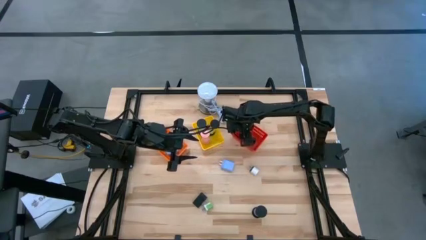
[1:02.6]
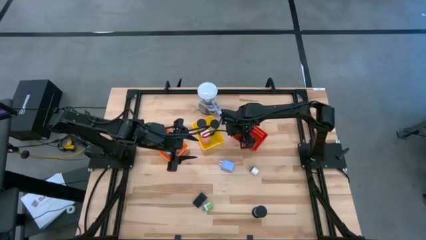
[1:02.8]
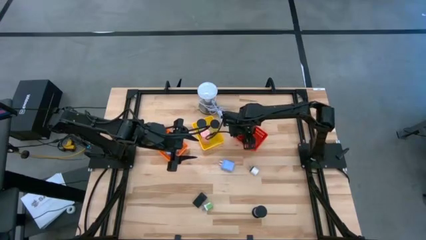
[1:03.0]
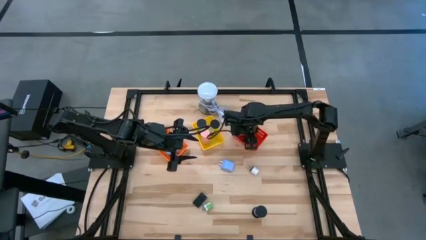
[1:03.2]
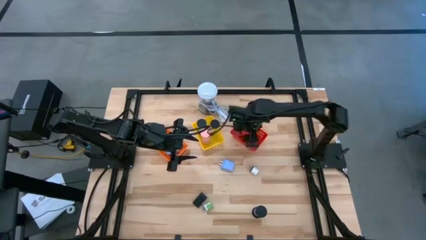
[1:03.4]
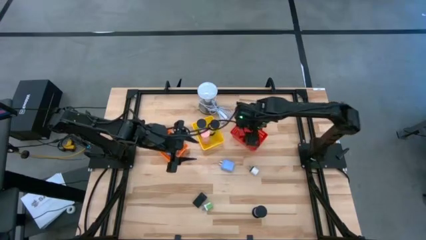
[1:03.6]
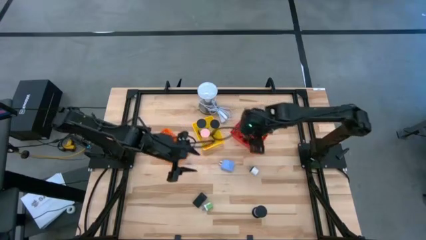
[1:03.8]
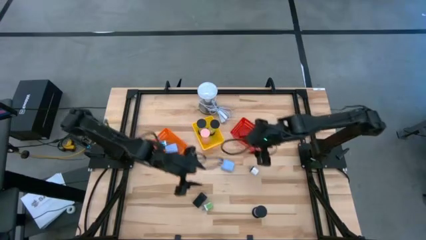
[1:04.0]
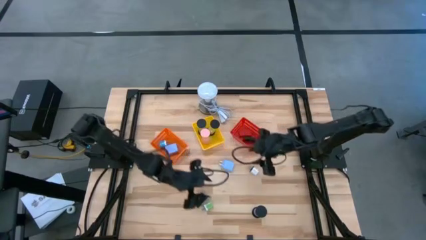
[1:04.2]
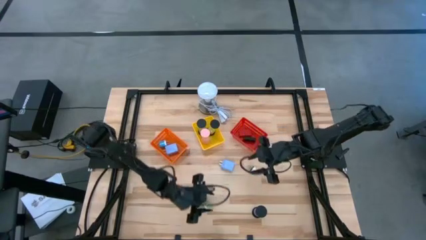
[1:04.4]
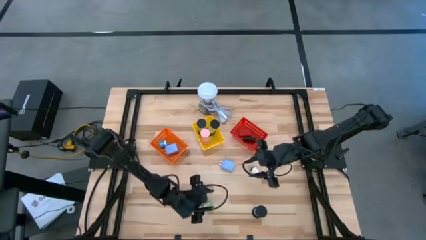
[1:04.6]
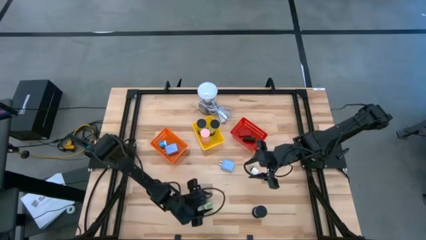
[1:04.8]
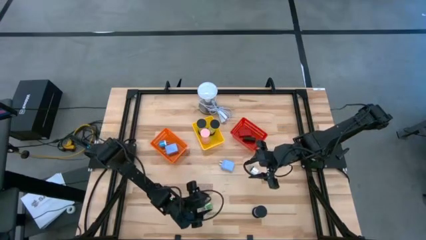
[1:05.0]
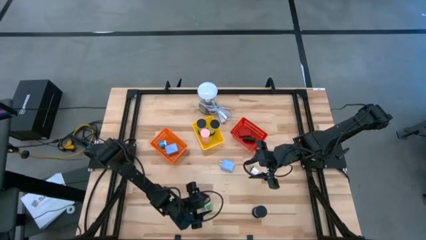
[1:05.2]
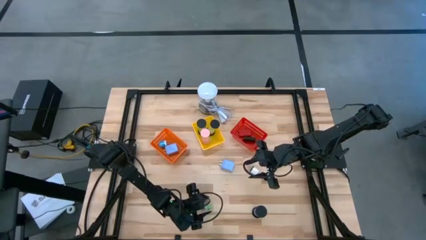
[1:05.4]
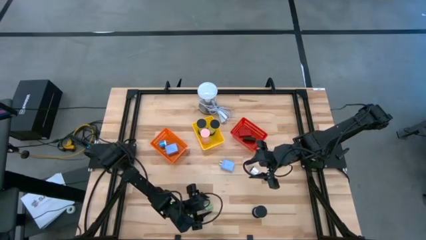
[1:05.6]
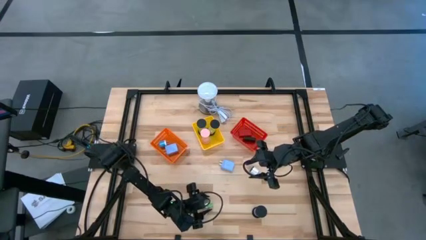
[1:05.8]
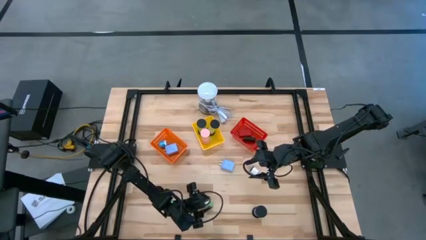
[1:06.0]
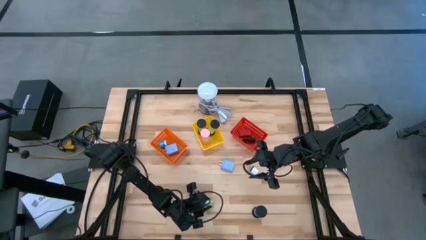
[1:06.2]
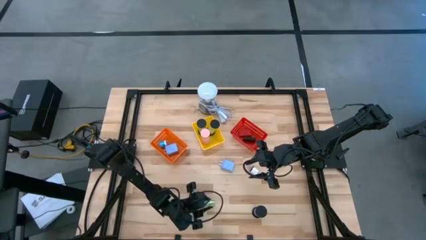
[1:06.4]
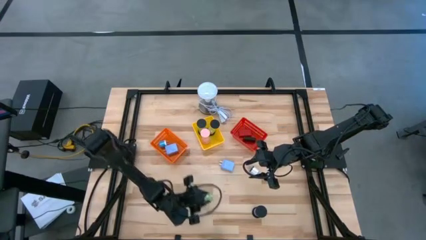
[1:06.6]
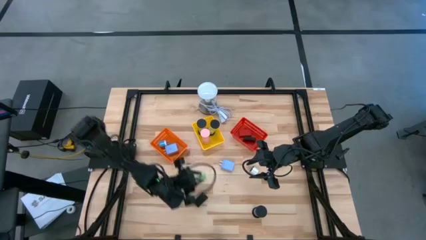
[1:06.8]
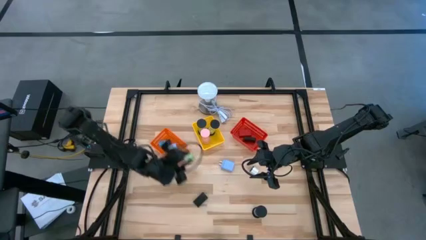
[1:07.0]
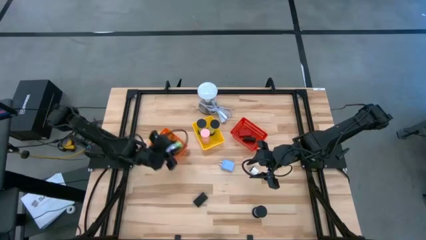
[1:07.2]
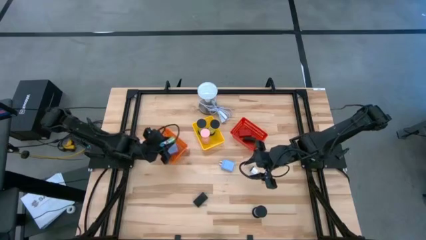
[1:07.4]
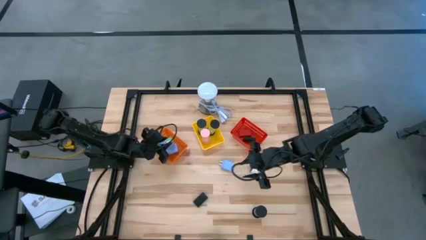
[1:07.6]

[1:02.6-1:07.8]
Task: Pick & Place Office items
Put the small green charger adapter into the orange basket

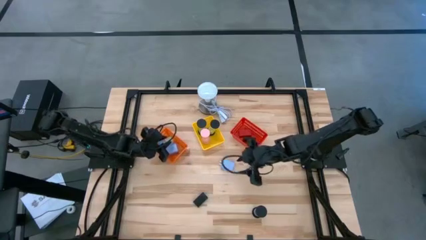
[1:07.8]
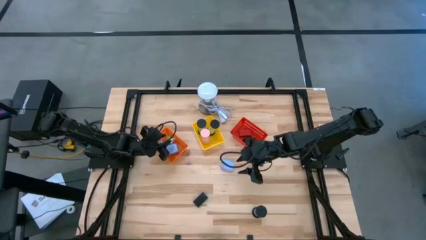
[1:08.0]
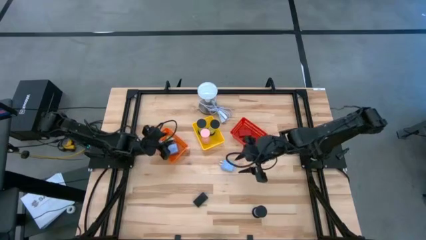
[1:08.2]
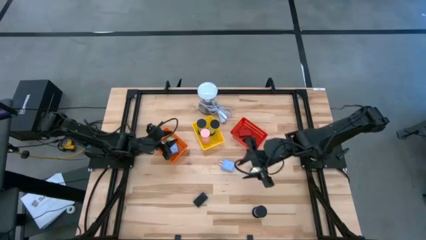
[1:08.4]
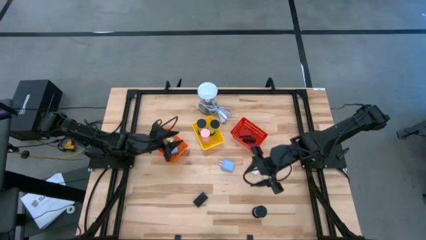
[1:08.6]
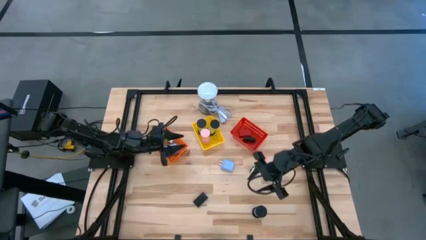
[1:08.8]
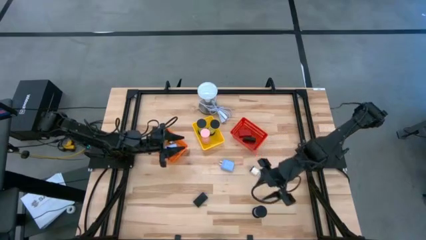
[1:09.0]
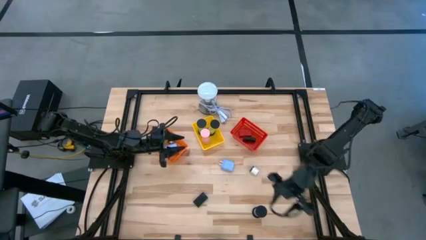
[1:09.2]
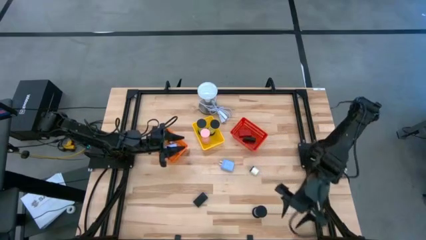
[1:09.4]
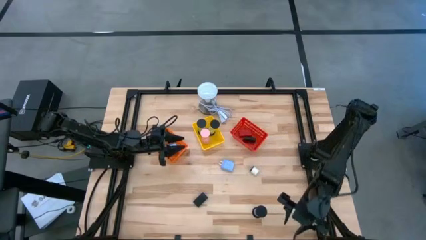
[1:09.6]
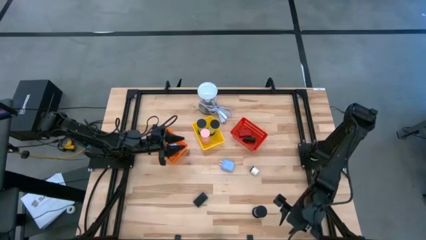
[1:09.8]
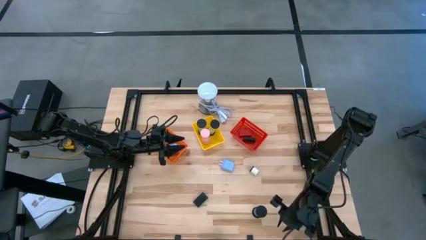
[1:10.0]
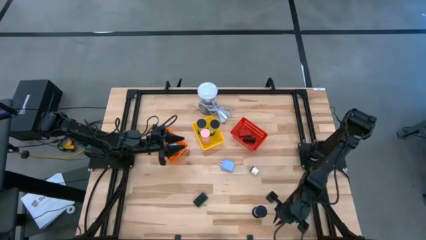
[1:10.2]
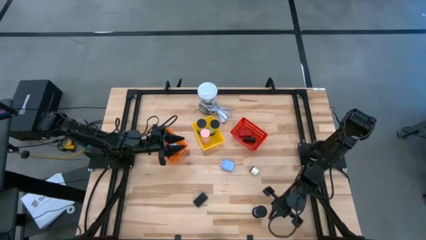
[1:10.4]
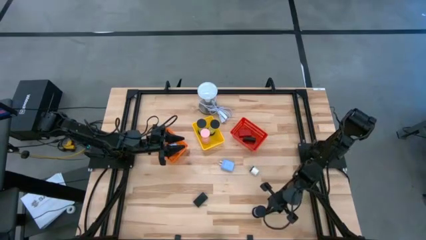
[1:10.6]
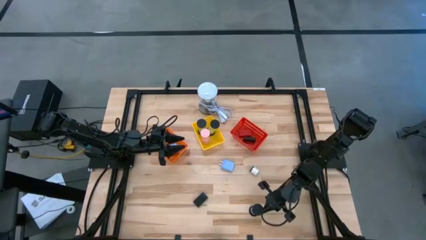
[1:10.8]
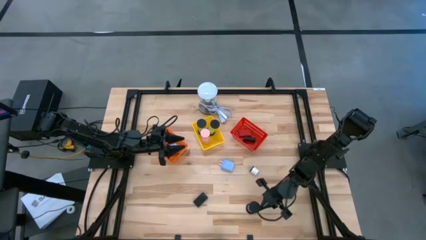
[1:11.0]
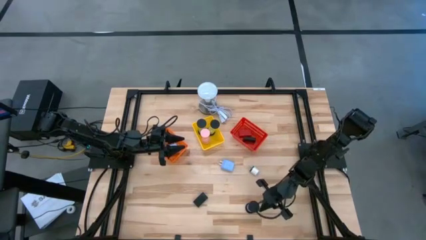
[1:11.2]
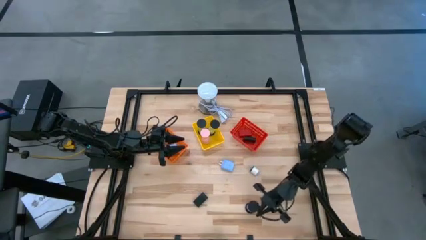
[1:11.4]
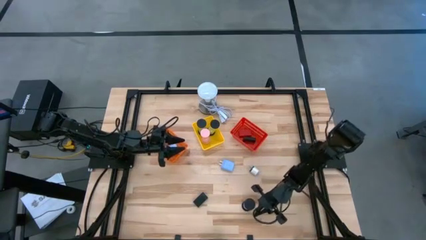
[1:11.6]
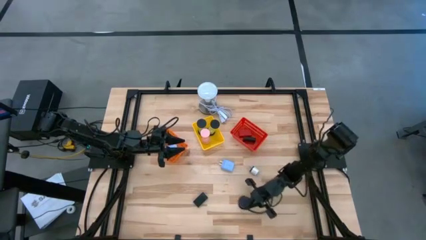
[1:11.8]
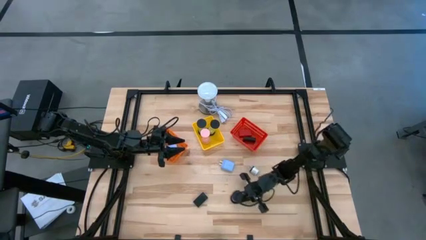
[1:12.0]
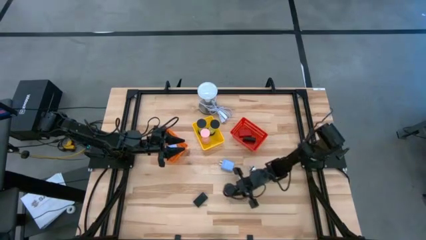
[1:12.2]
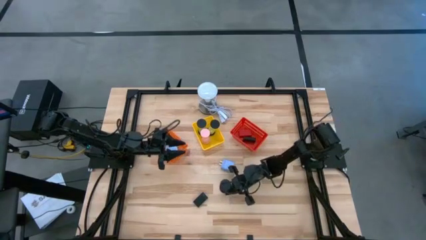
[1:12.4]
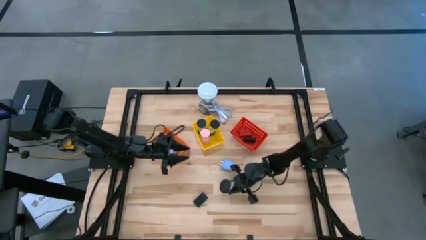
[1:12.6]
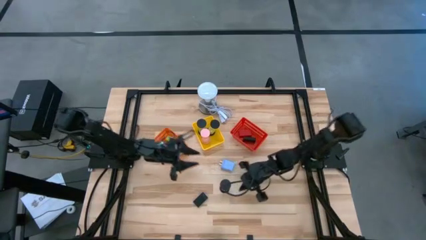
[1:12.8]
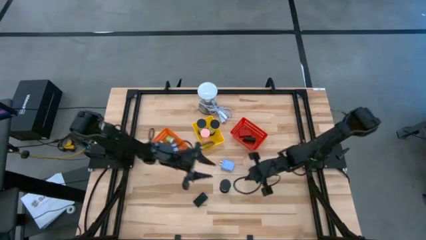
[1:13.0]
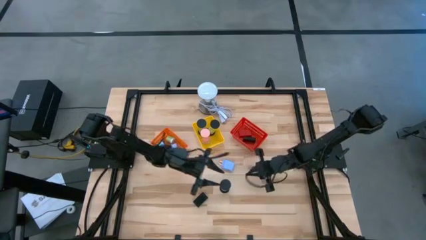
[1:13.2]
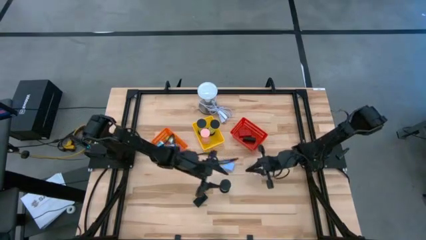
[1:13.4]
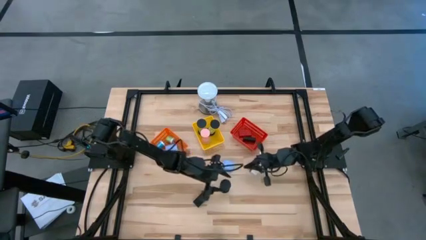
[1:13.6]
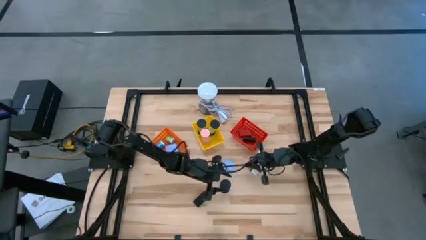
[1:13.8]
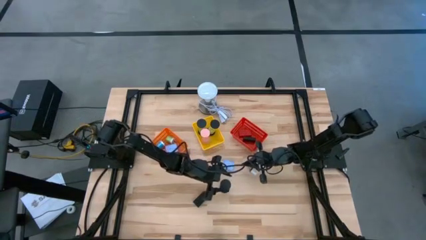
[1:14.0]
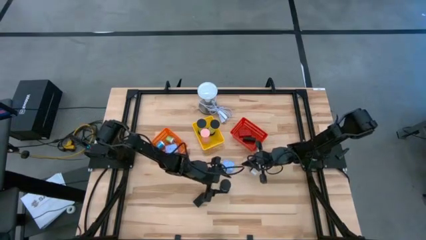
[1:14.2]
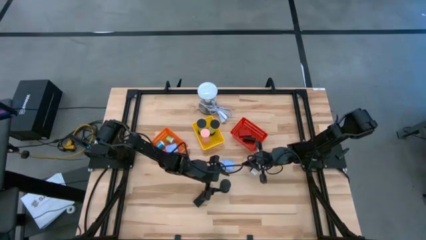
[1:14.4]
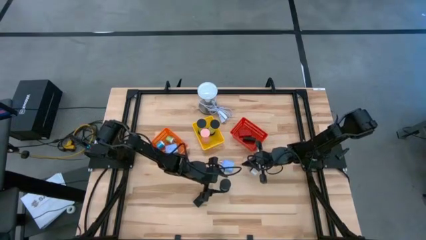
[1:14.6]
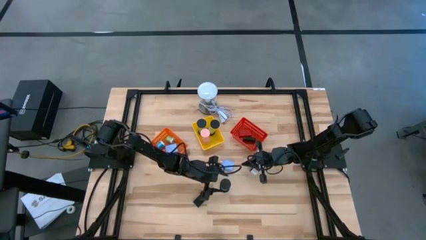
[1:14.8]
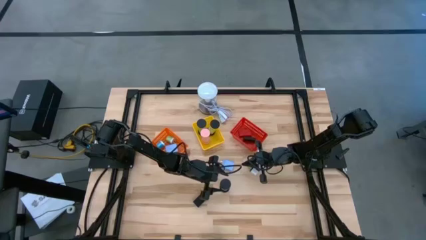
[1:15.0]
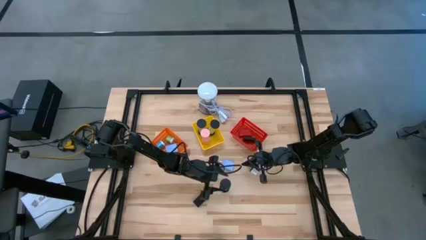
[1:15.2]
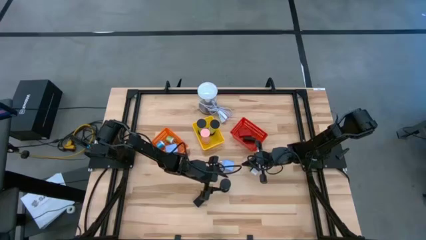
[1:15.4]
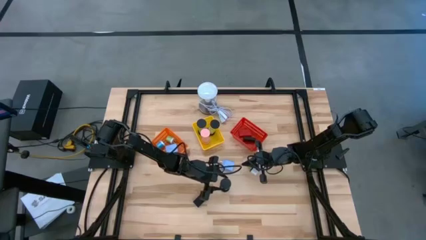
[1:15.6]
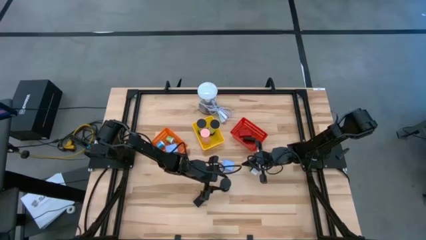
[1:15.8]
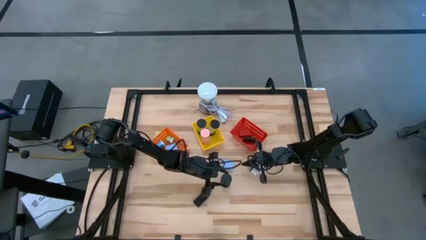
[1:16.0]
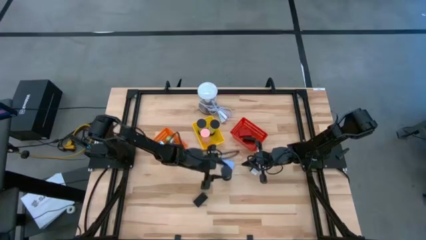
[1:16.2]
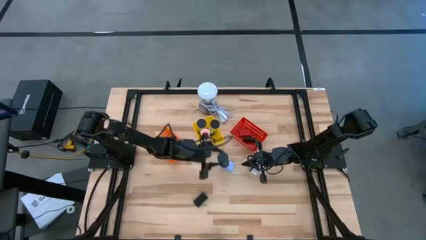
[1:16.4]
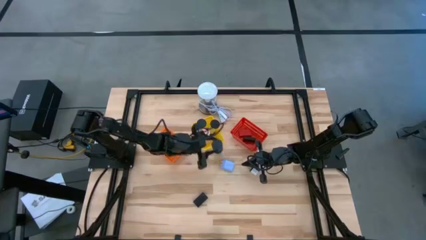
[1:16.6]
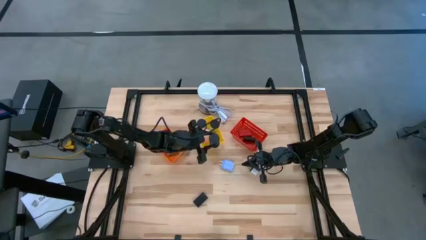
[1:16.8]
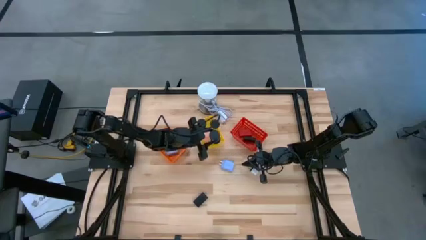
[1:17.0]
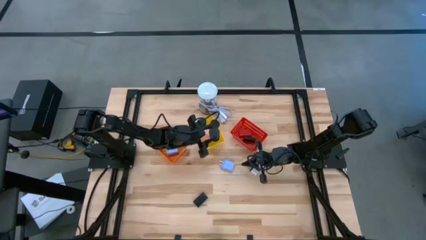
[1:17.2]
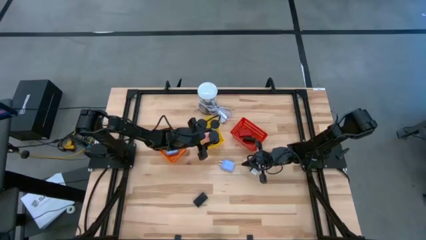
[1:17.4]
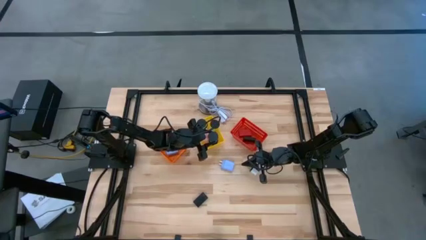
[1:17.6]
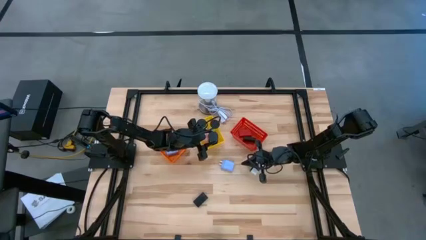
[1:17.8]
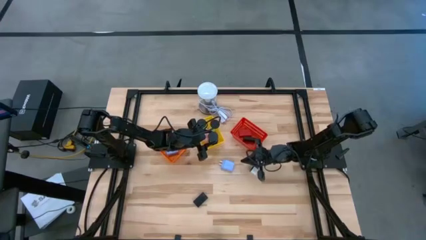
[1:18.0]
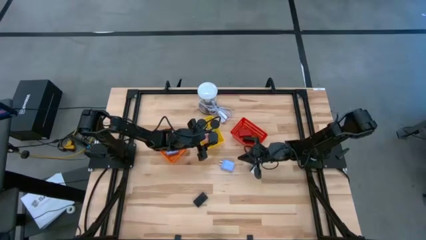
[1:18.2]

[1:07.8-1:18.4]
Put the blue hourglass into the yellow basket
